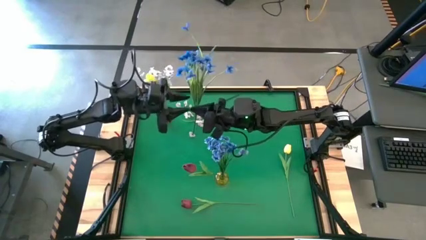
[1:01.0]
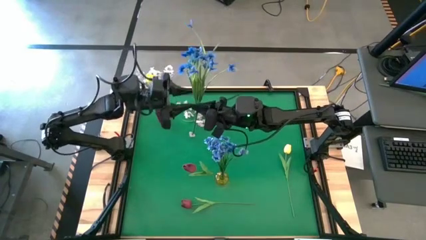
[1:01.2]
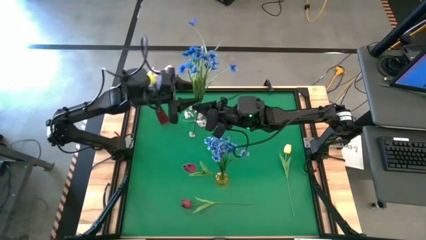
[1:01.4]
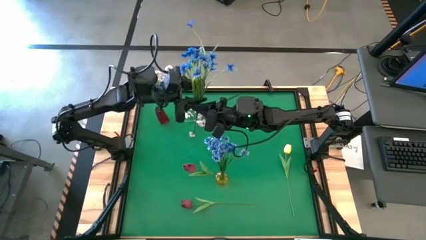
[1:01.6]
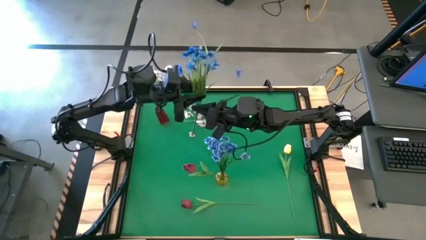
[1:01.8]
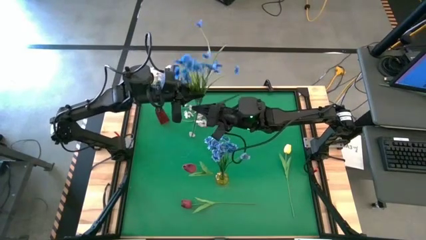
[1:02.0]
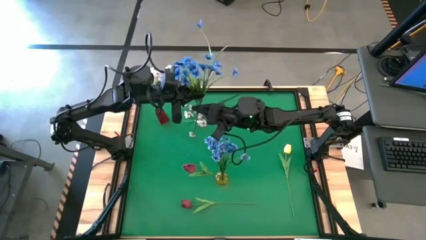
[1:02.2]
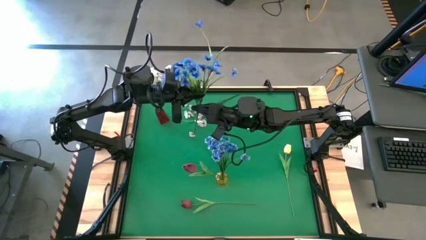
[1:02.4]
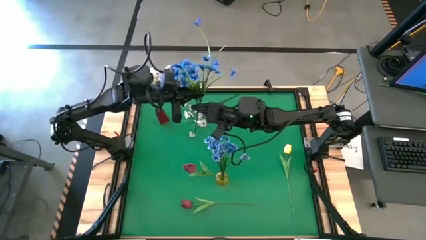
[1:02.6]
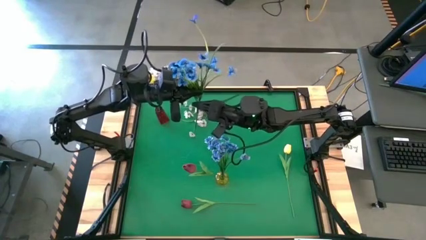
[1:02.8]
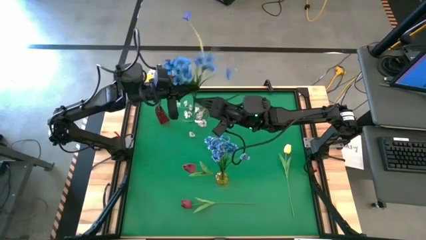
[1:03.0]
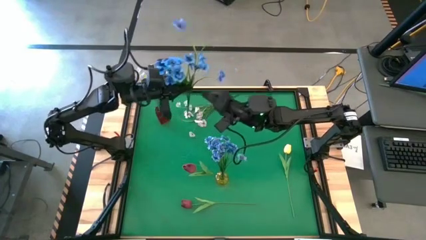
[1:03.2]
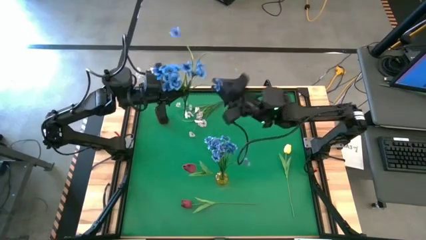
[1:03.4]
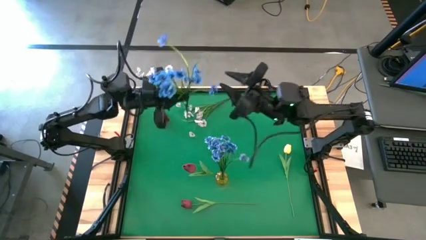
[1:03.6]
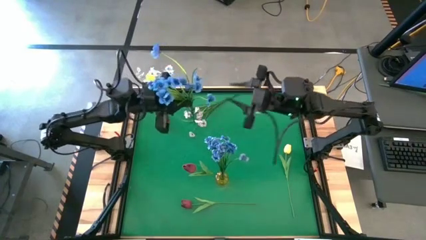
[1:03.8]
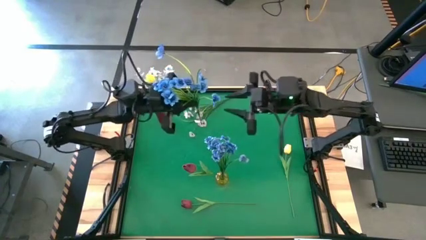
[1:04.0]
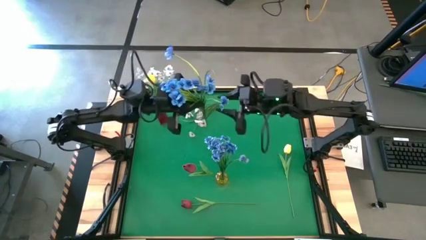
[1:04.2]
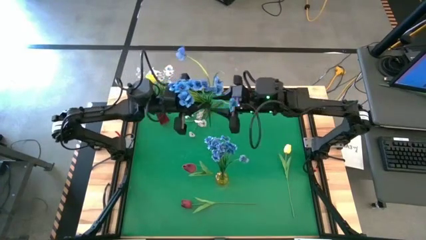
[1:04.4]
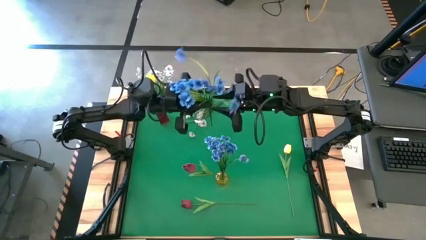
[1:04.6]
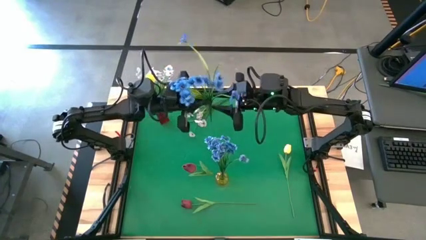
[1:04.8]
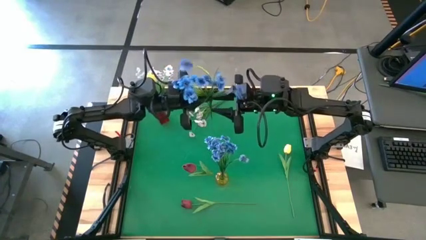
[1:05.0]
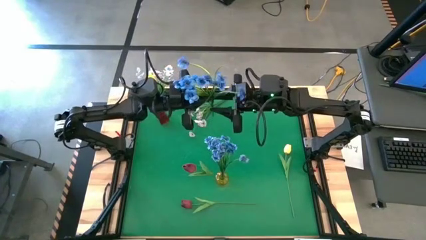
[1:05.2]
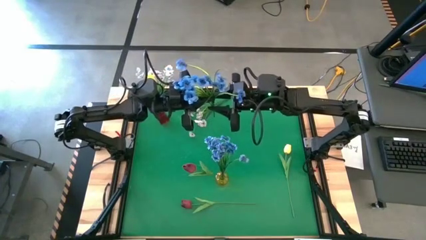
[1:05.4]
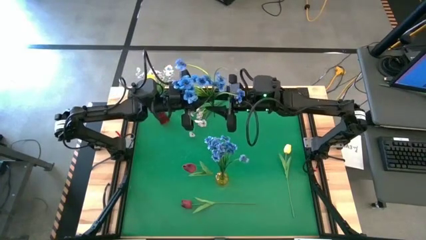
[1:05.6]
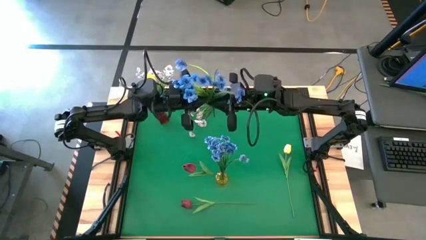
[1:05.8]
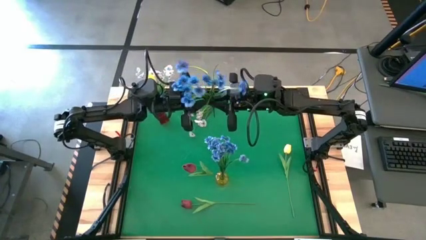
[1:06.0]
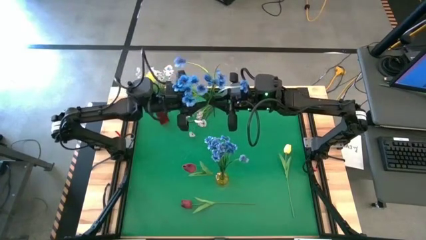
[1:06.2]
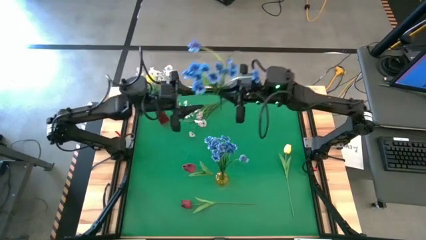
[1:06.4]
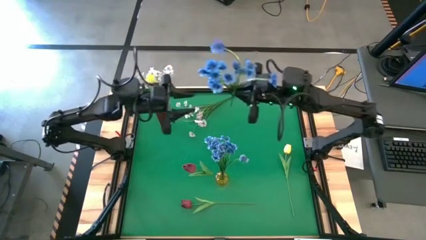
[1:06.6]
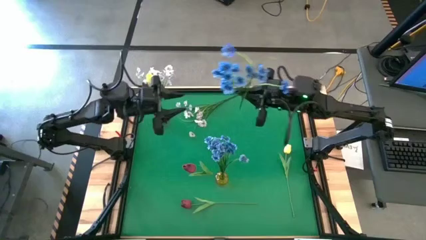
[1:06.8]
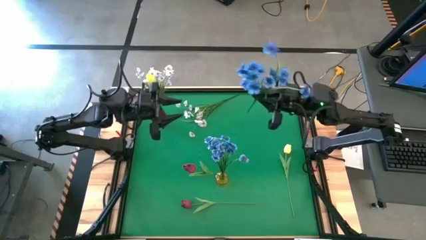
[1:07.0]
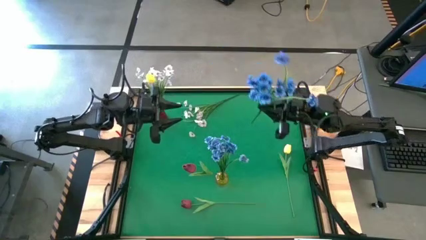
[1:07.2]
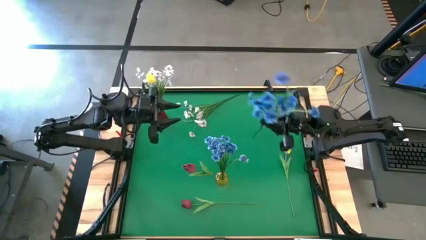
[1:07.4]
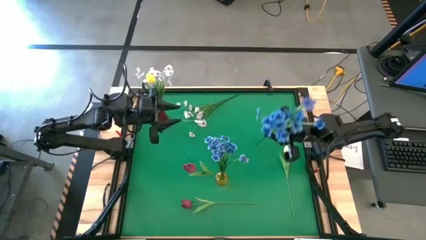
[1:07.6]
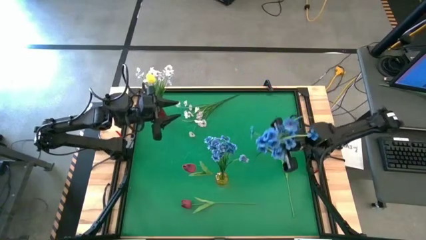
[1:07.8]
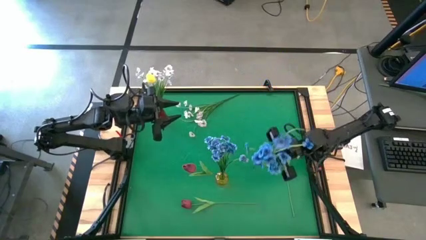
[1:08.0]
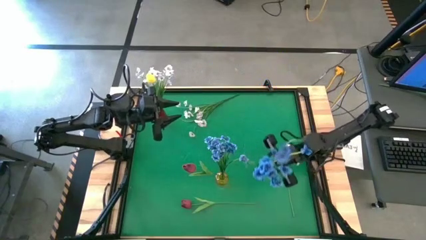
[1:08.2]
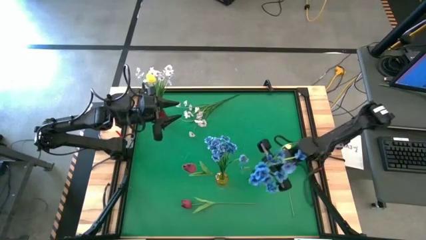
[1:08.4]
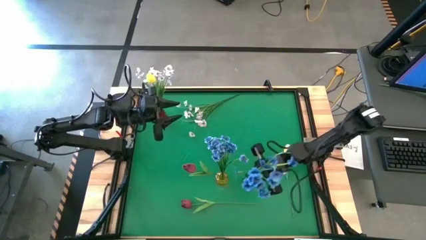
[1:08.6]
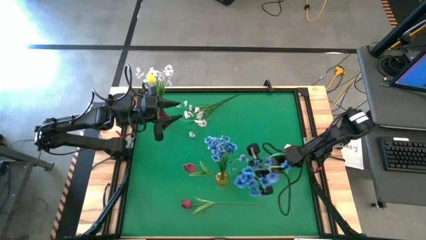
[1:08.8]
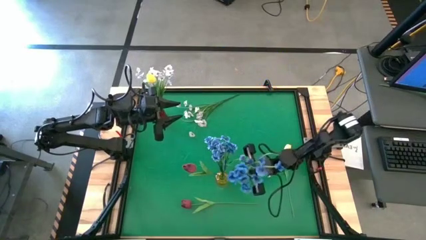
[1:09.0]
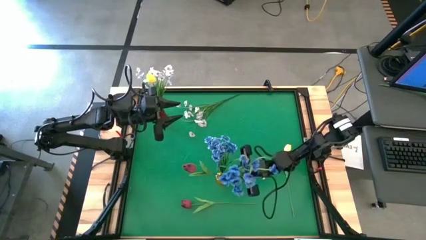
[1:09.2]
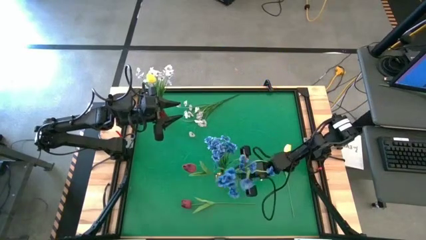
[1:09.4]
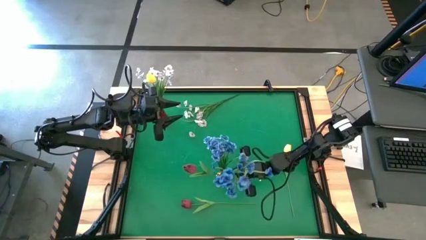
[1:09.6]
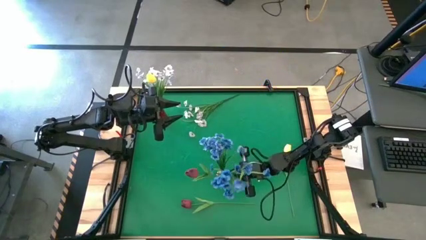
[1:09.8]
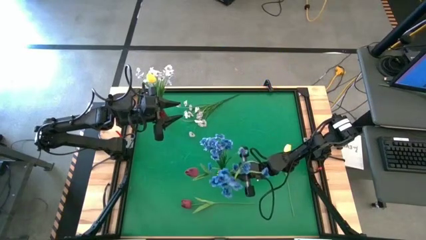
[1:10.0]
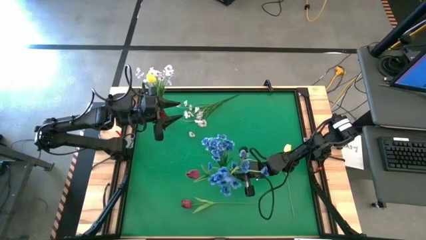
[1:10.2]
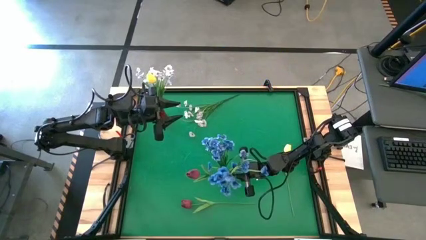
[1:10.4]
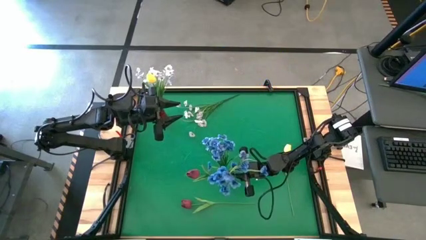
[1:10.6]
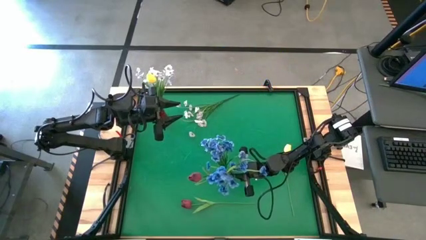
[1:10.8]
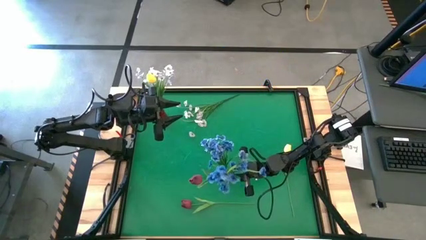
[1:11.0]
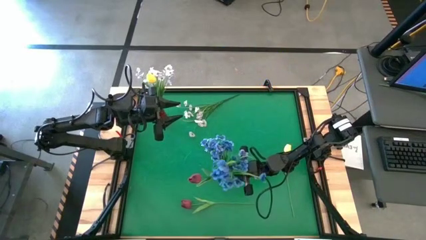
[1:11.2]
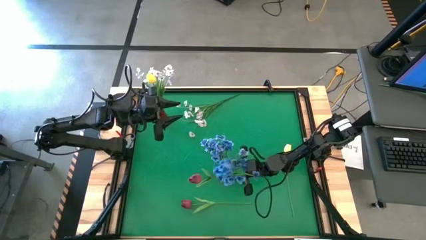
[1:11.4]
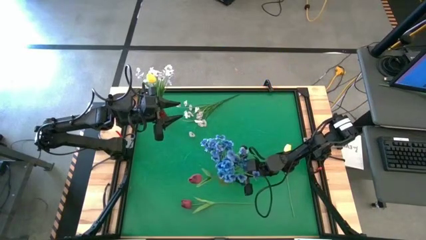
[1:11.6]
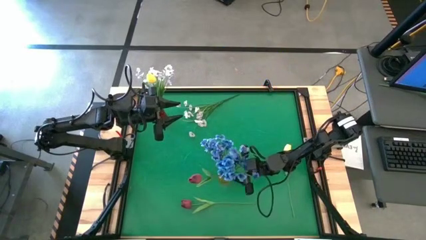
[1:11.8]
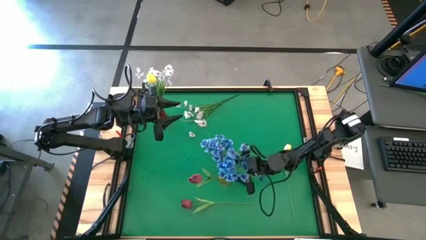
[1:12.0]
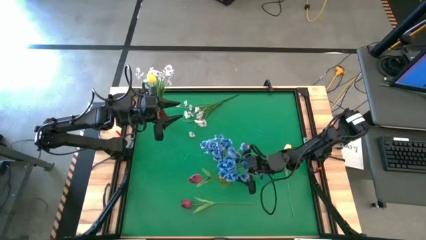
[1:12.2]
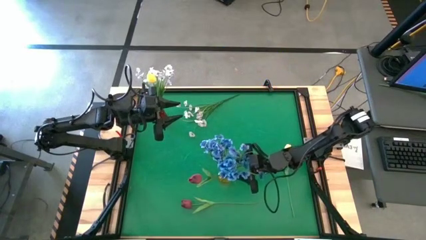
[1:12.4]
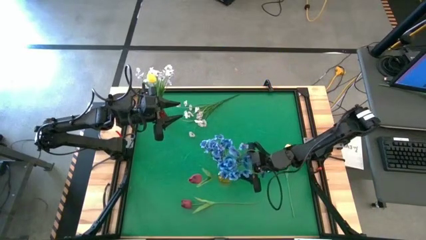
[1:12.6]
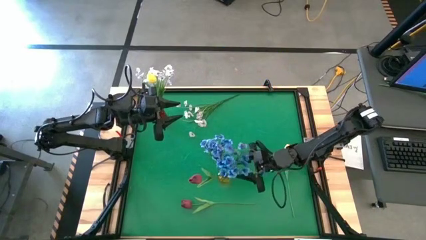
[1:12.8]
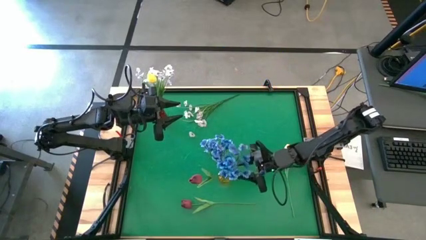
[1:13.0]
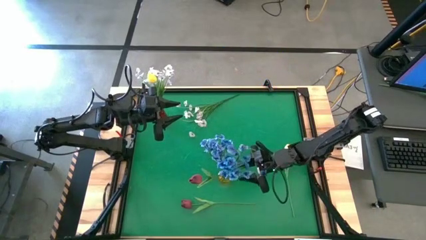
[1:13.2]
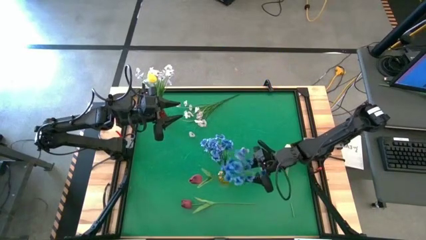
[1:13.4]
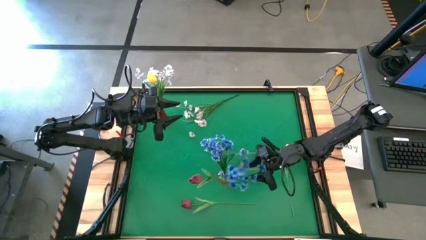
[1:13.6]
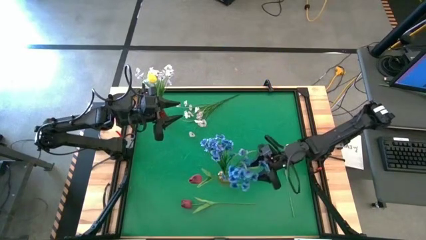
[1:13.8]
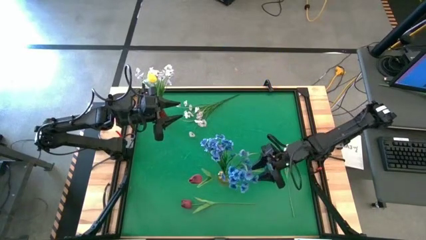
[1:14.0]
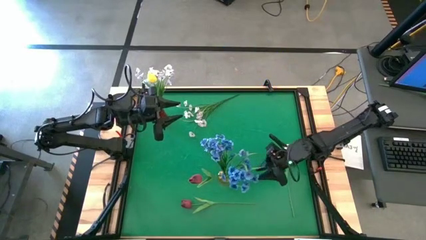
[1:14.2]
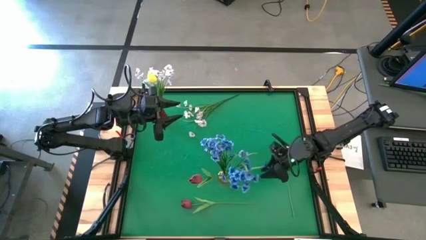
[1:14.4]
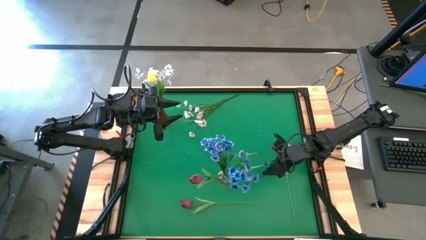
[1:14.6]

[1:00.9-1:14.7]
Task: Sort flowers into vase by color
Put the blue flowers into the yellow vase
